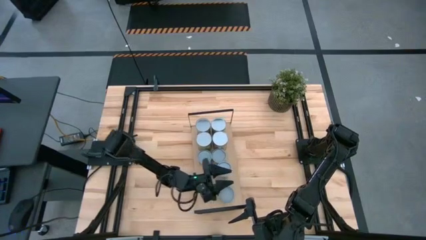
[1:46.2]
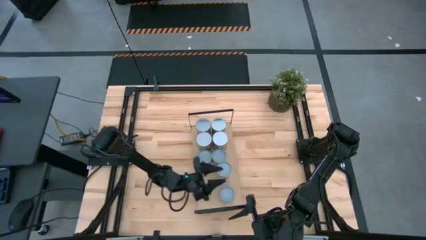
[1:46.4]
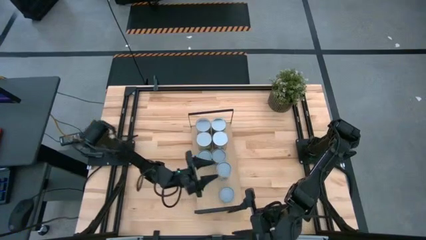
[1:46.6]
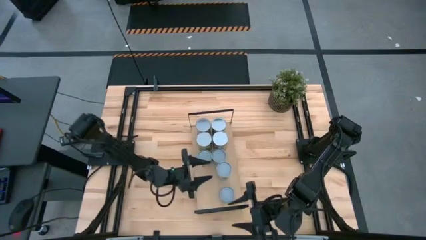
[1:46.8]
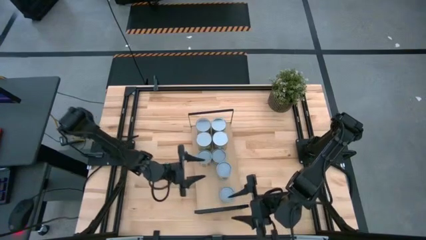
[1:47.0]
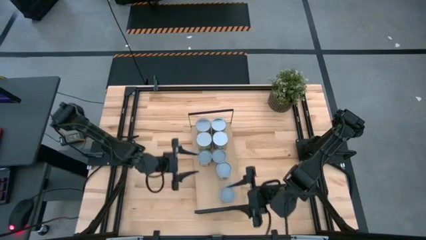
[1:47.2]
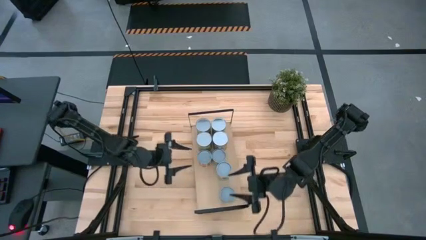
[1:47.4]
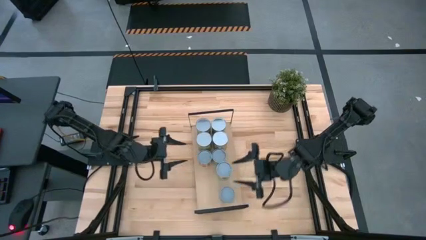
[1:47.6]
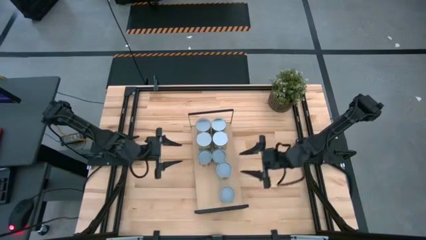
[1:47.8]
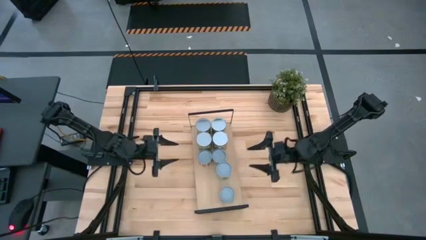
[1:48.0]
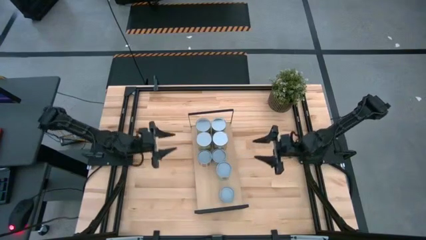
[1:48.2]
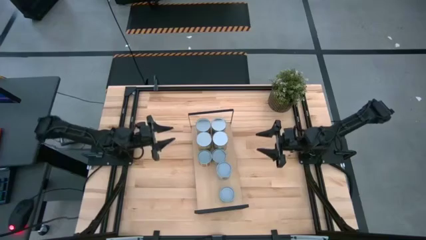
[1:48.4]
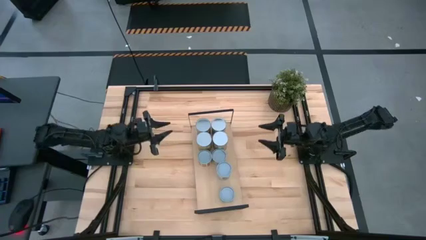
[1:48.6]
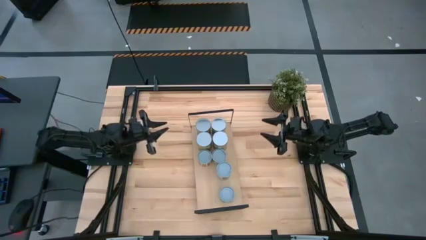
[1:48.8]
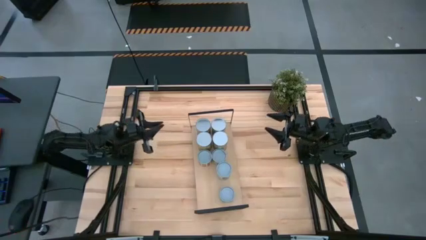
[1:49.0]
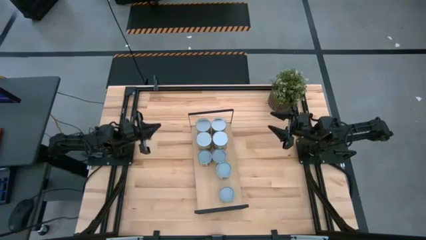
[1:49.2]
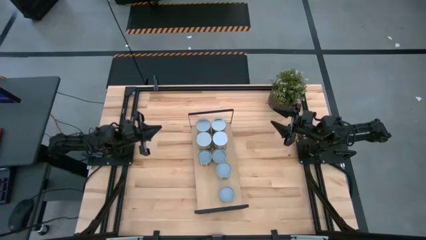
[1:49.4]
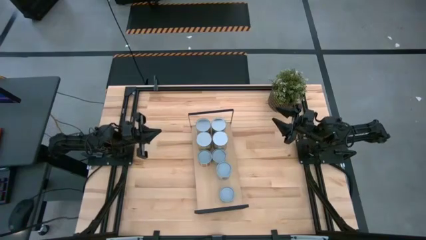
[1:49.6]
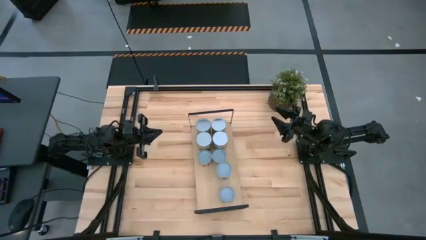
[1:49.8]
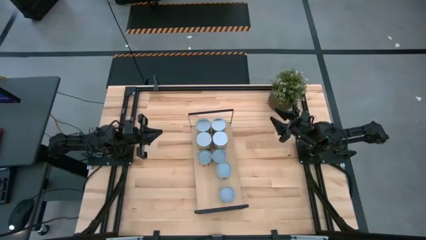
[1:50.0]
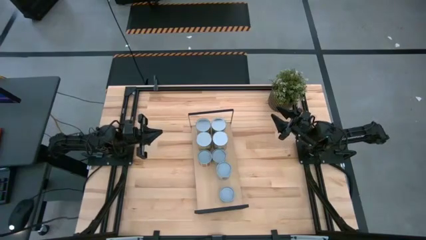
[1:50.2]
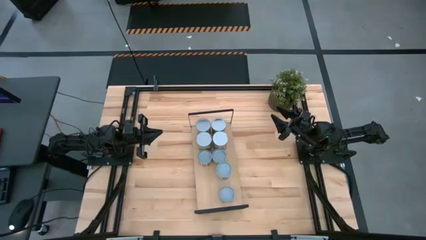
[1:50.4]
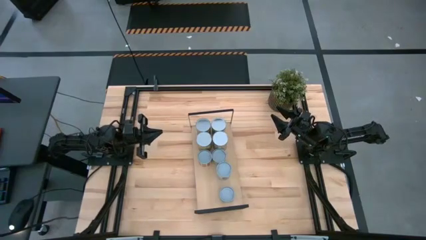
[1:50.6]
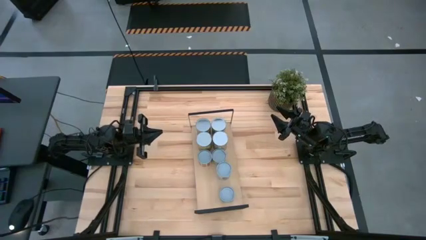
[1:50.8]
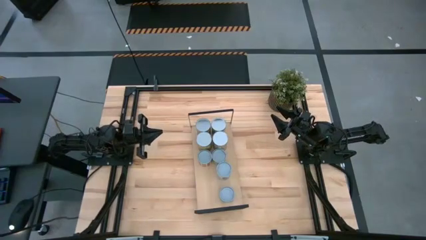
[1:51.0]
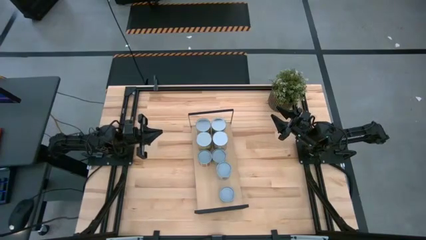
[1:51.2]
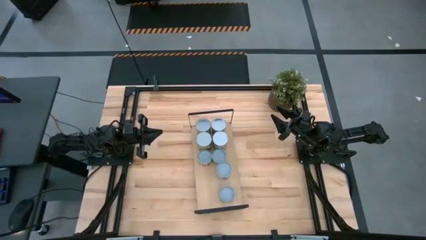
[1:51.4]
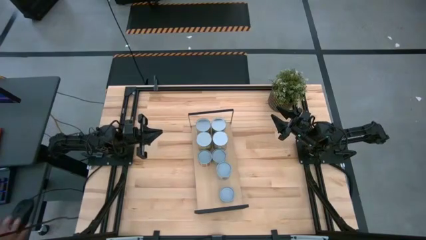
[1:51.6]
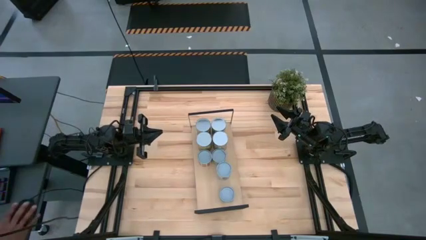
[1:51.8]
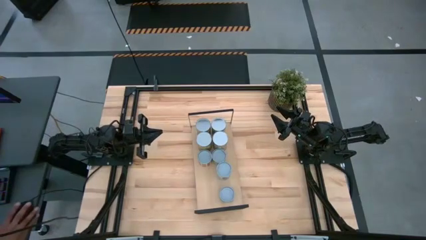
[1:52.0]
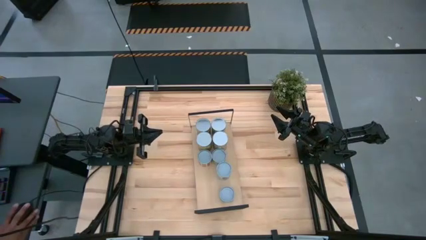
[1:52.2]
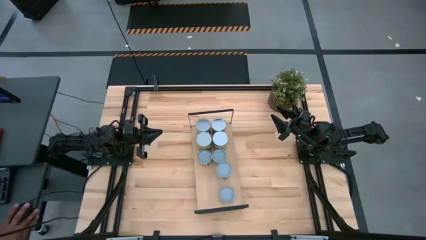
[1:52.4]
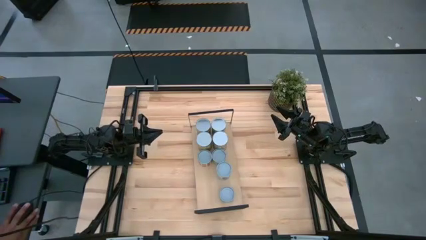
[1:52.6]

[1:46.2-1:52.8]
Task: Pick and place cans onto a shelf
Return to Home Position

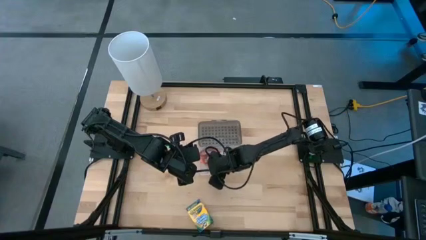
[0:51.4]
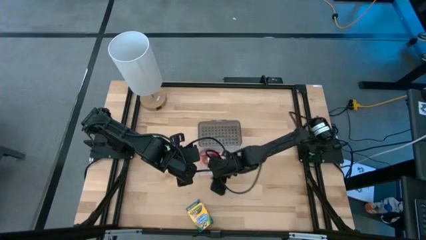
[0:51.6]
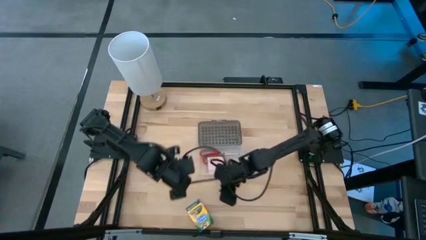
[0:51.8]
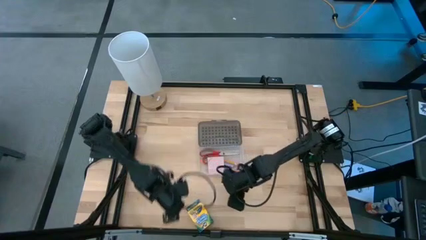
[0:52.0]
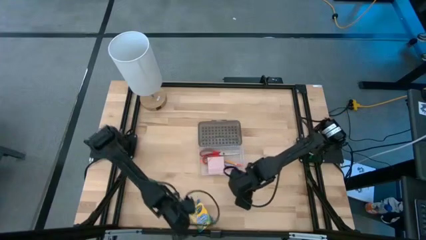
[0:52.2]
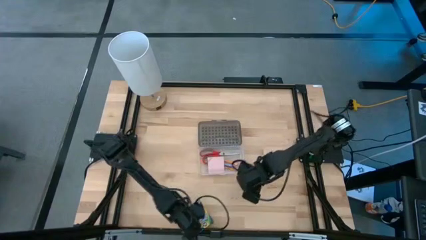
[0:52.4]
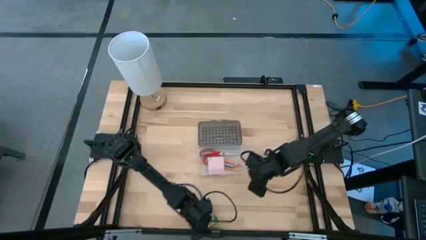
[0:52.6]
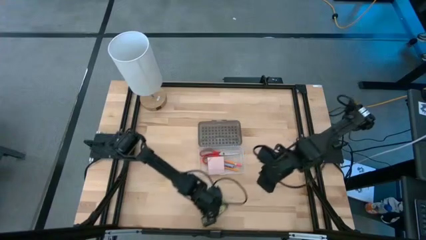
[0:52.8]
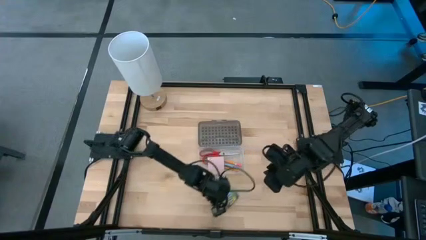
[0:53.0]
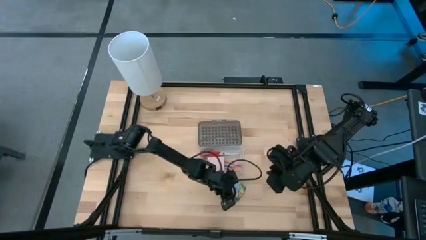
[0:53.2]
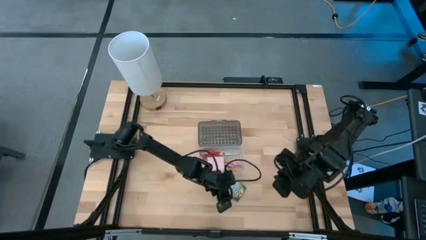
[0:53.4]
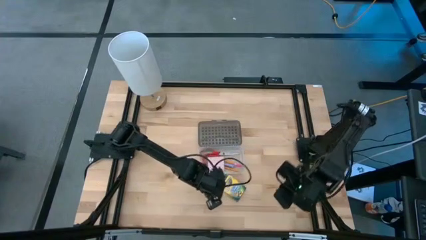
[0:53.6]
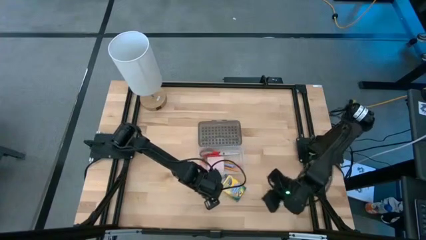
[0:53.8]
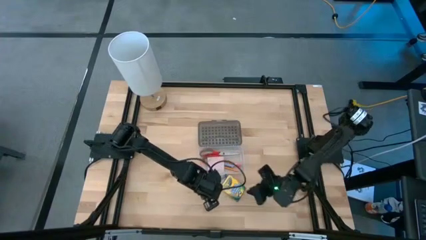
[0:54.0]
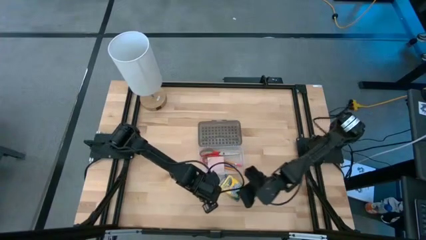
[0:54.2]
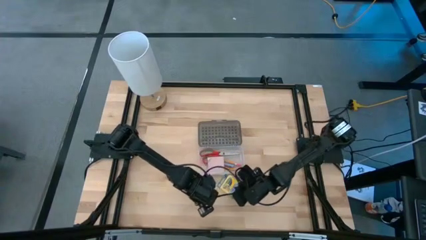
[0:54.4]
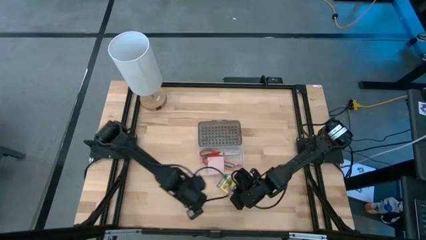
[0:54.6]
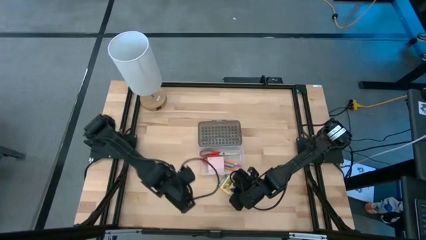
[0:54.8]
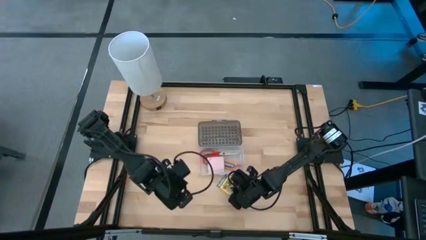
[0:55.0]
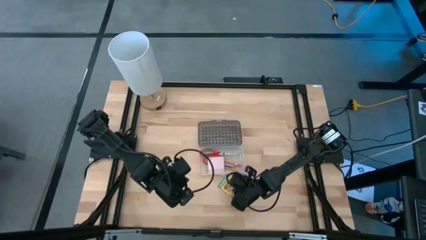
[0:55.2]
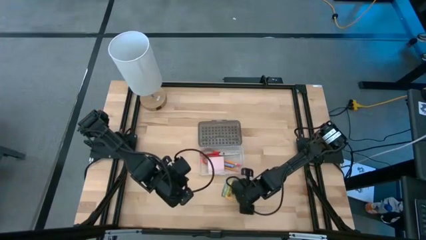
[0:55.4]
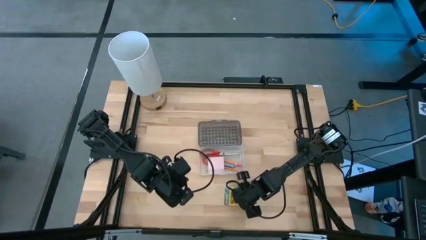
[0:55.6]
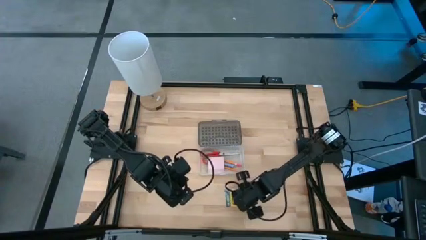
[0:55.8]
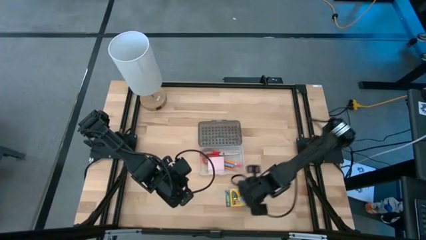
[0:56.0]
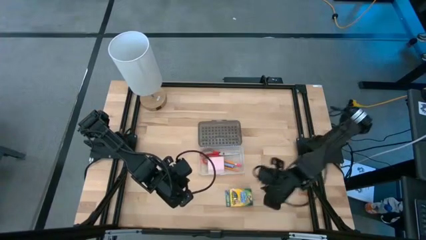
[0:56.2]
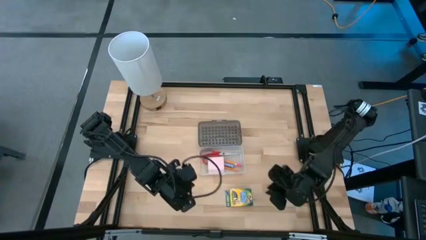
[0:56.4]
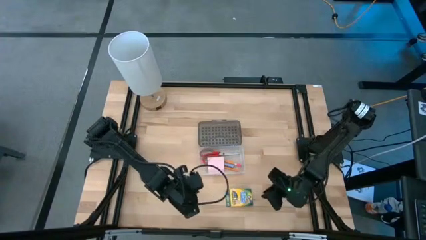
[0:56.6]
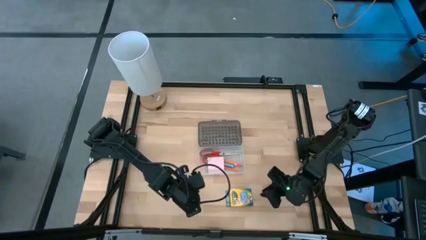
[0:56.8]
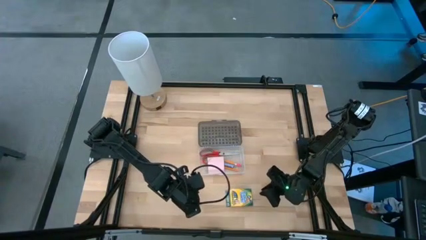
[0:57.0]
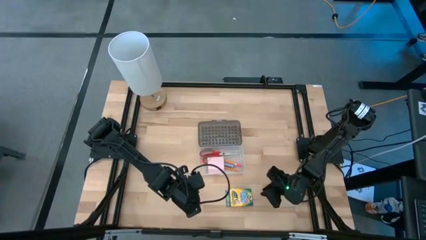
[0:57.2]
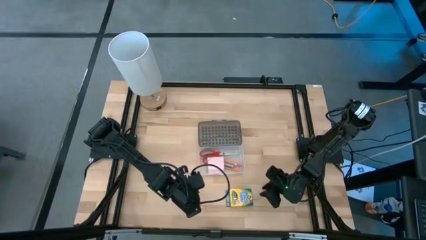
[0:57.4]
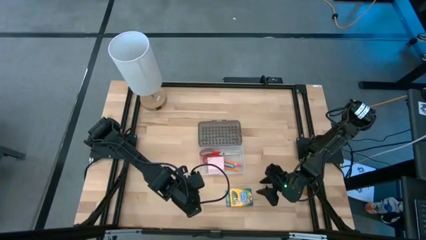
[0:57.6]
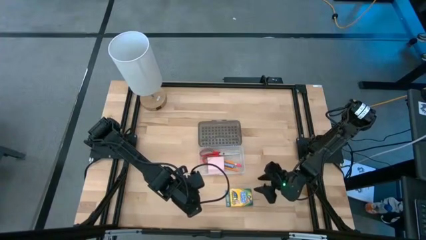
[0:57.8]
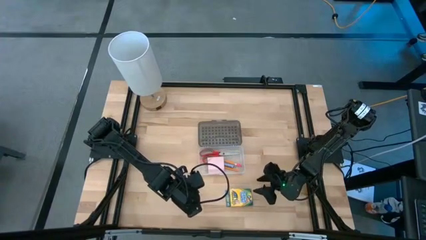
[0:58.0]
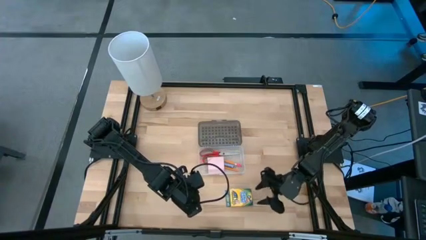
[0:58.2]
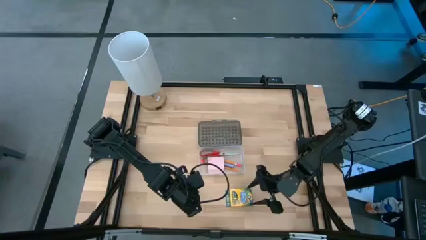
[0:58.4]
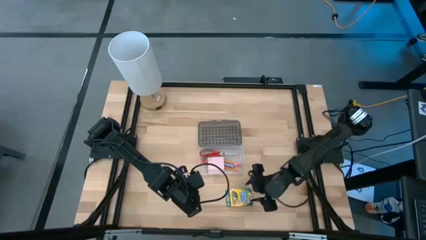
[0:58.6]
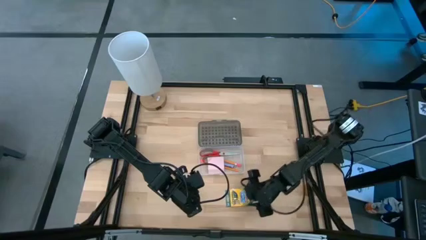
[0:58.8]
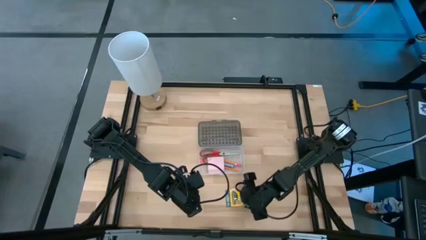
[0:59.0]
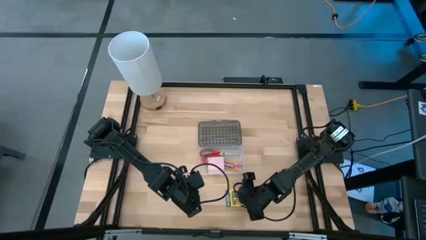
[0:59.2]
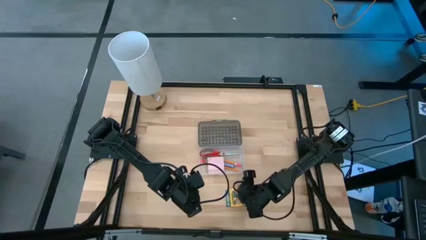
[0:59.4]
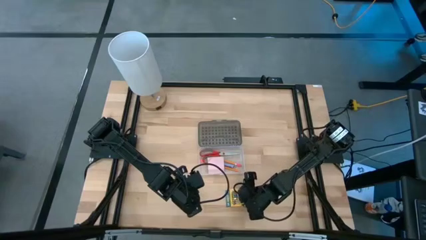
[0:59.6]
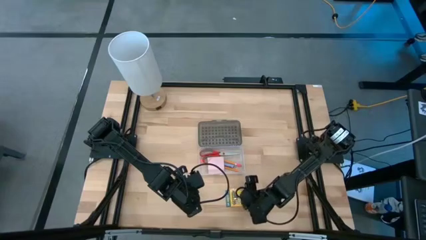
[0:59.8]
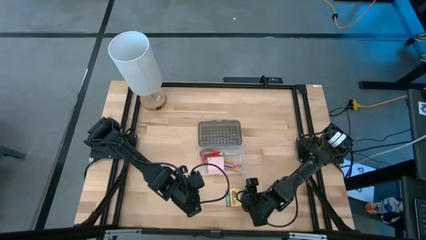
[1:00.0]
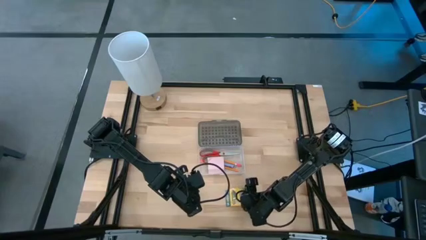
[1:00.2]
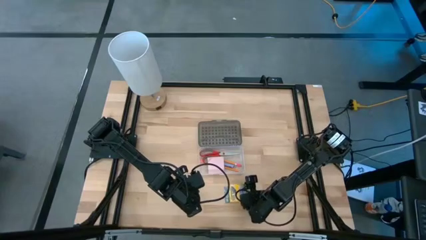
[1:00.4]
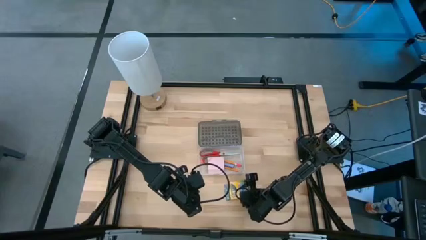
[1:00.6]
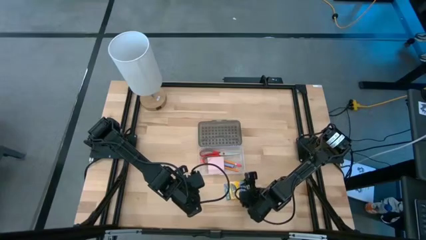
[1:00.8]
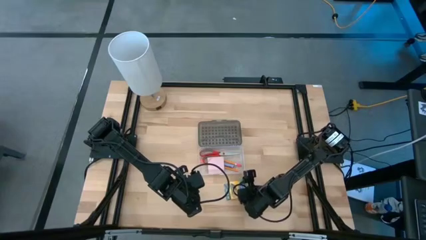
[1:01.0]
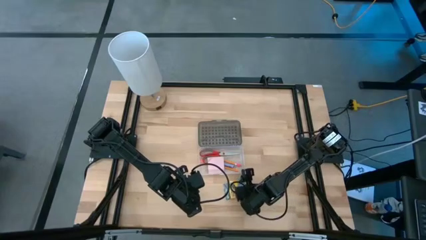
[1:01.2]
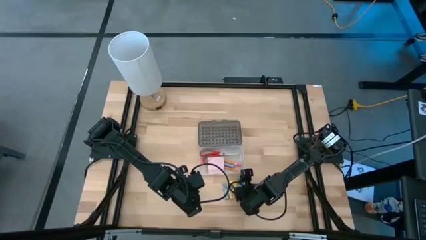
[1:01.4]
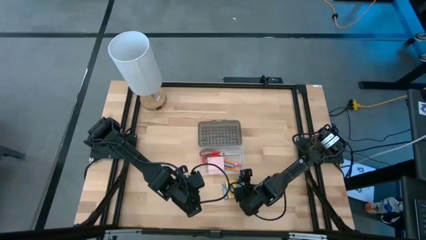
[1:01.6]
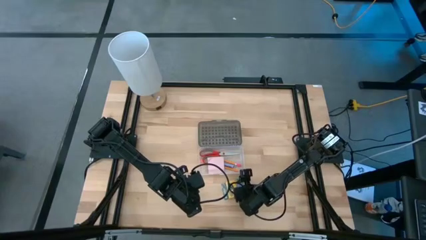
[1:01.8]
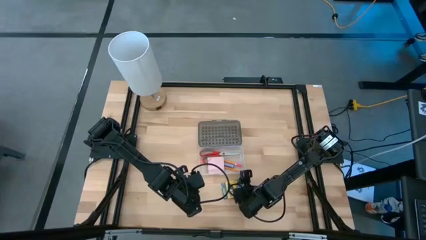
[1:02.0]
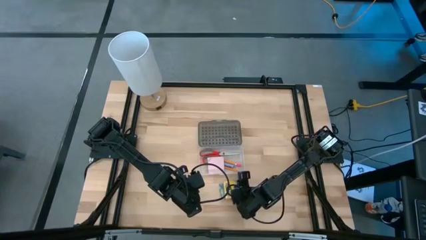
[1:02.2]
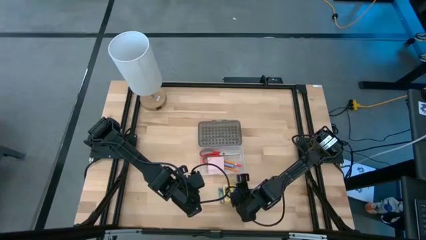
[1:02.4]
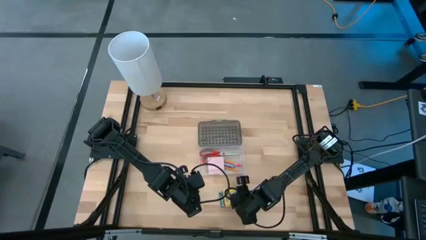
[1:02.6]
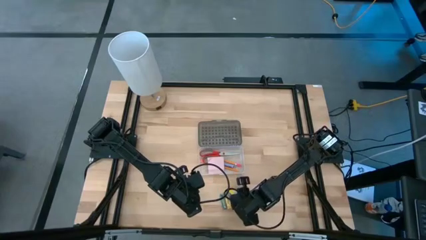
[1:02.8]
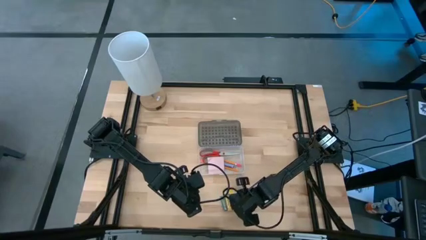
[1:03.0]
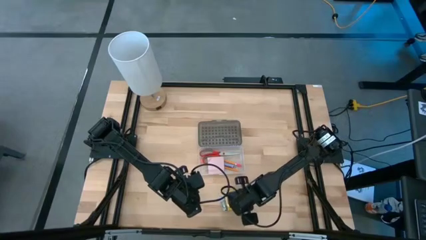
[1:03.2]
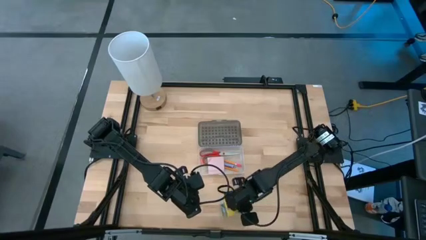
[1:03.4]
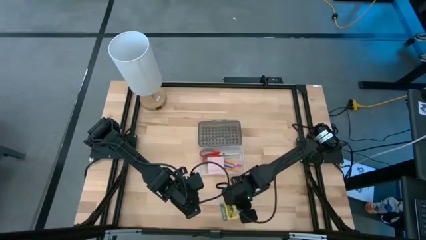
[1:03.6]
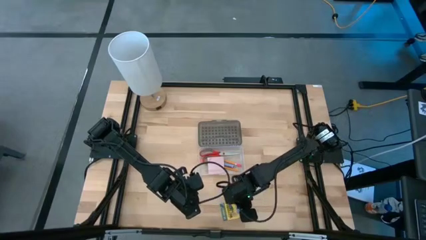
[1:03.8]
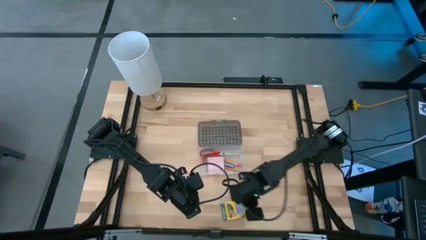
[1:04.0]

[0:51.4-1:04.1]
Task: Pack school essentials
Put the yellow crayon box into the transparent supply box
